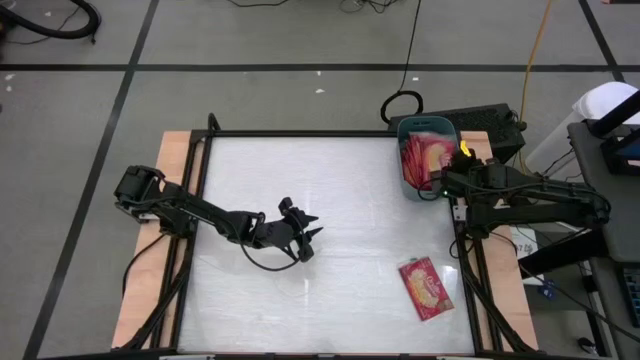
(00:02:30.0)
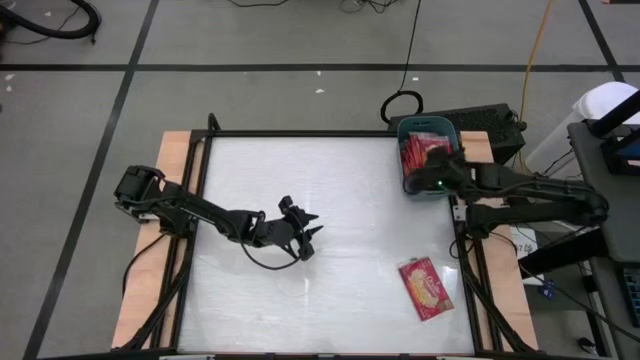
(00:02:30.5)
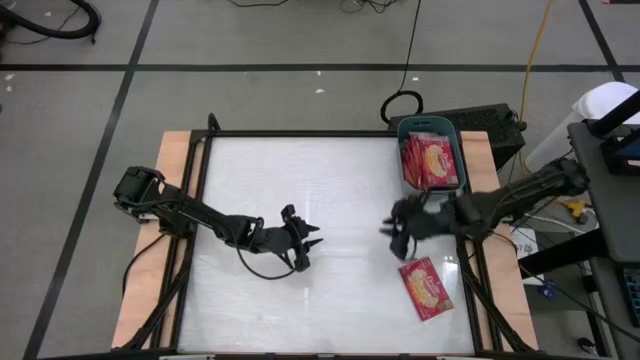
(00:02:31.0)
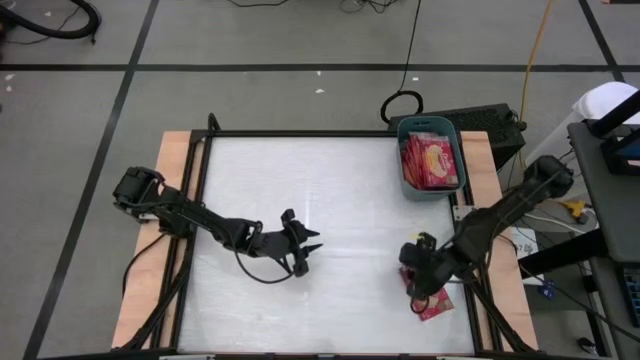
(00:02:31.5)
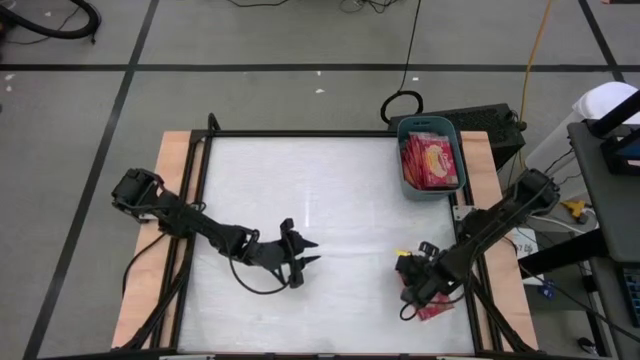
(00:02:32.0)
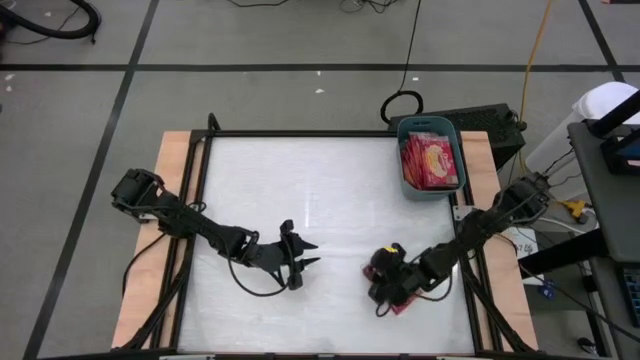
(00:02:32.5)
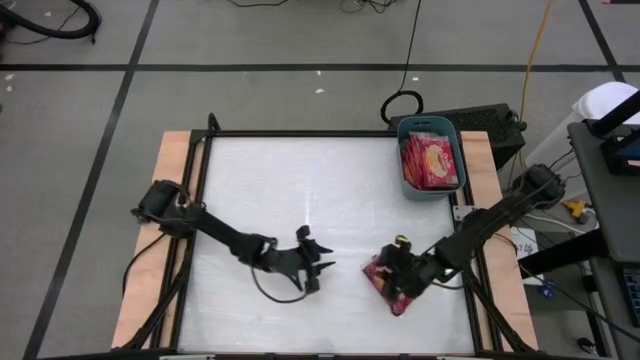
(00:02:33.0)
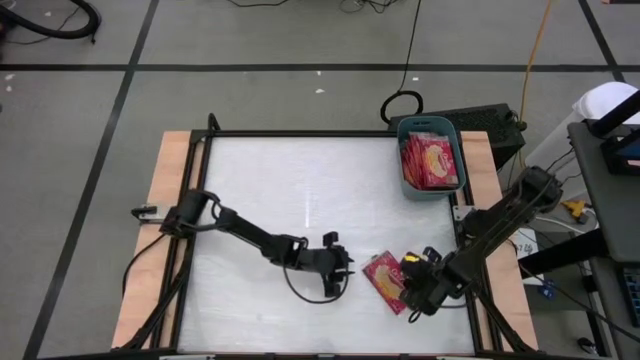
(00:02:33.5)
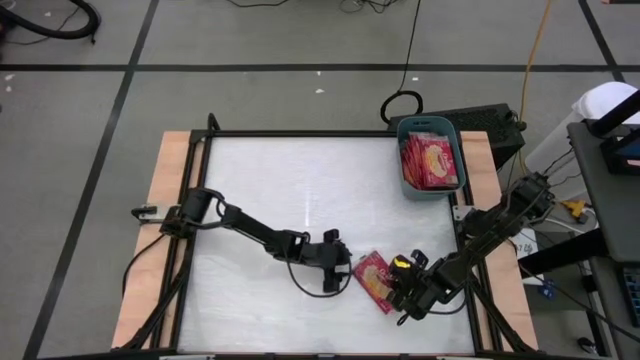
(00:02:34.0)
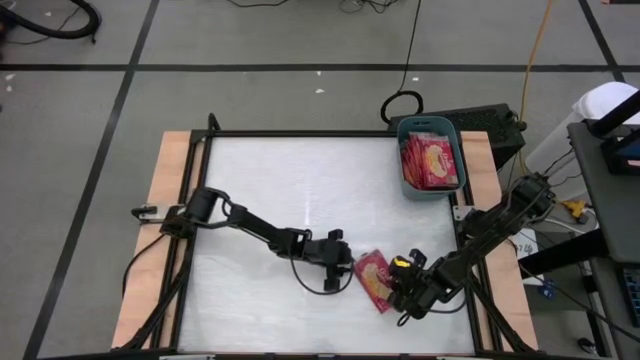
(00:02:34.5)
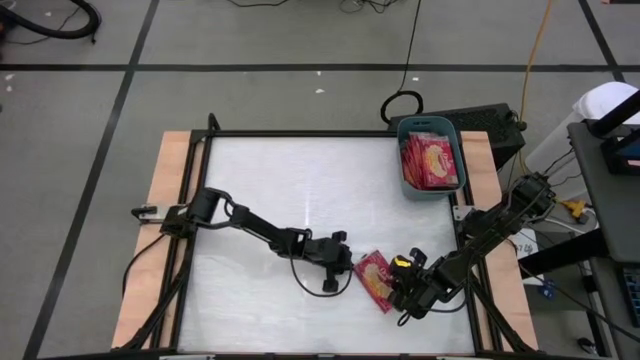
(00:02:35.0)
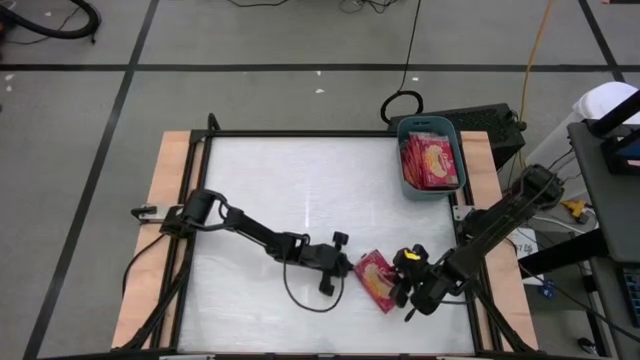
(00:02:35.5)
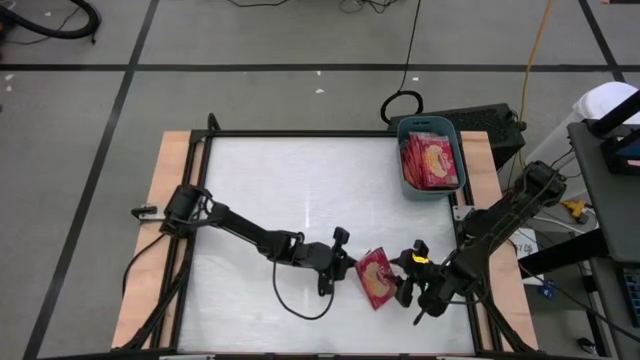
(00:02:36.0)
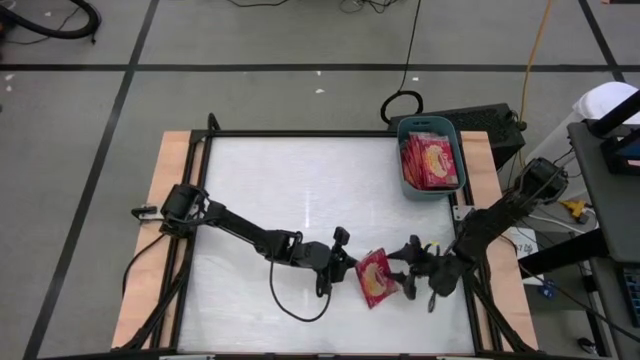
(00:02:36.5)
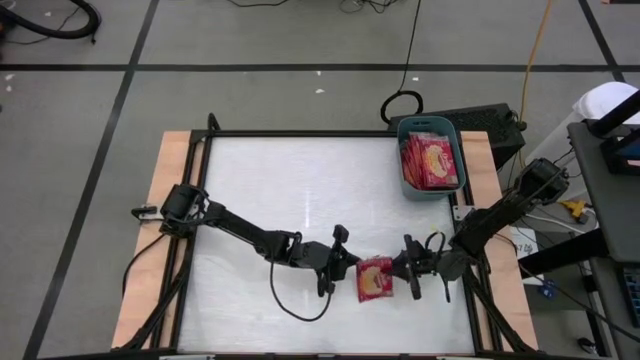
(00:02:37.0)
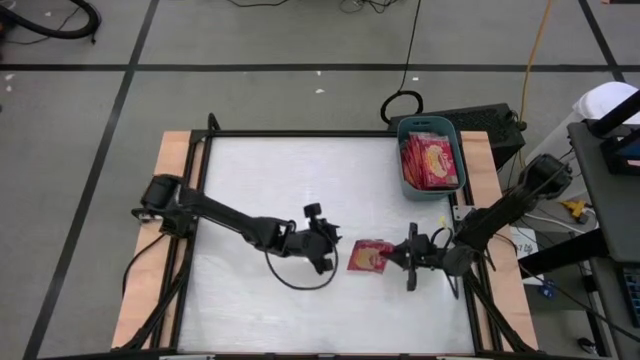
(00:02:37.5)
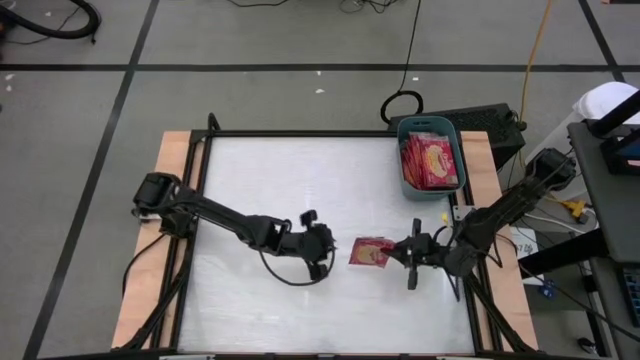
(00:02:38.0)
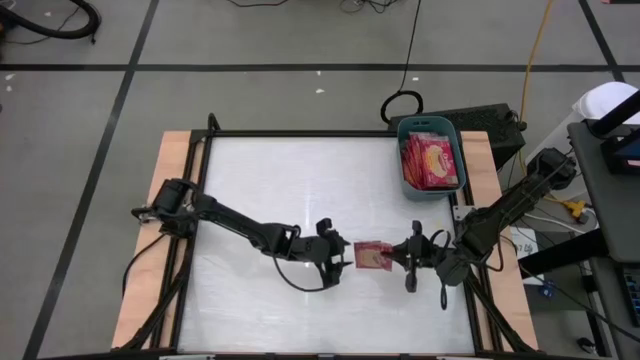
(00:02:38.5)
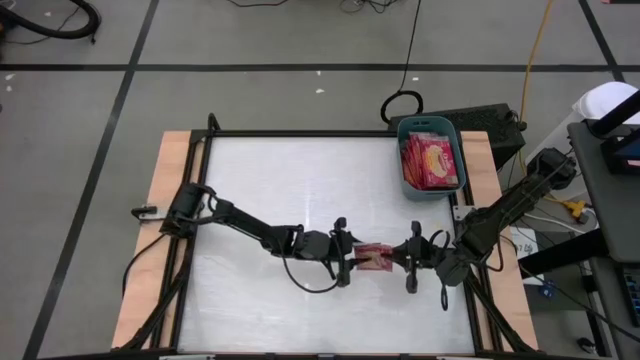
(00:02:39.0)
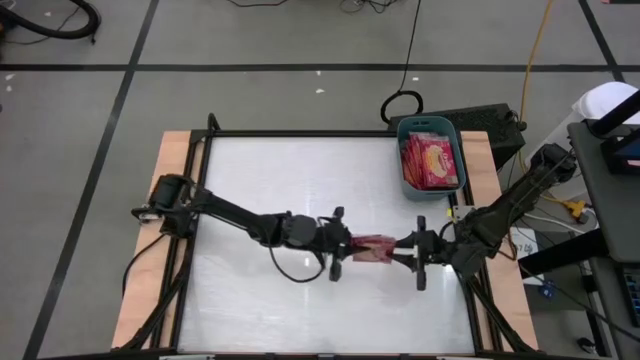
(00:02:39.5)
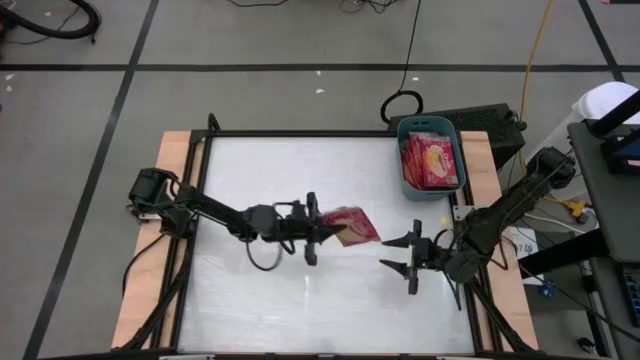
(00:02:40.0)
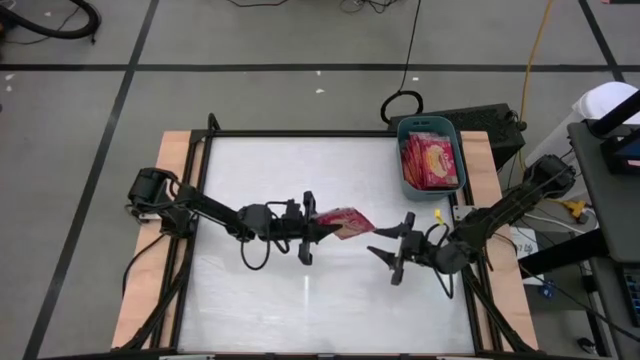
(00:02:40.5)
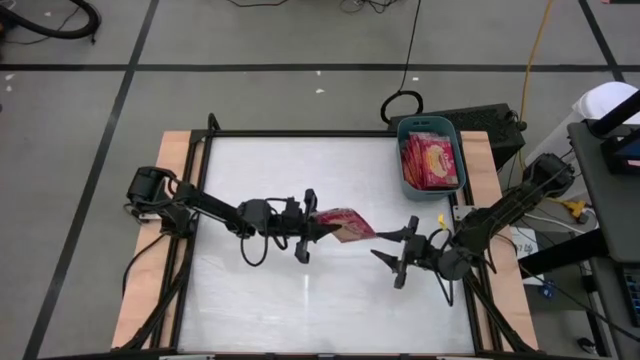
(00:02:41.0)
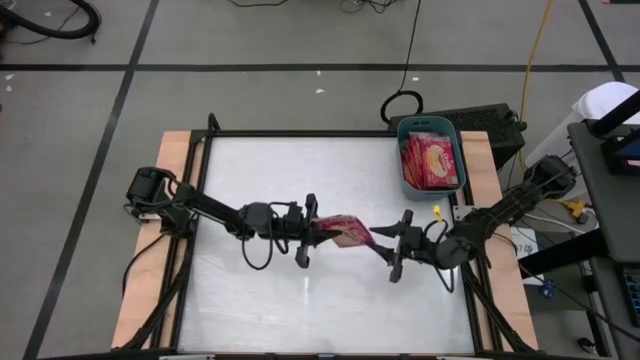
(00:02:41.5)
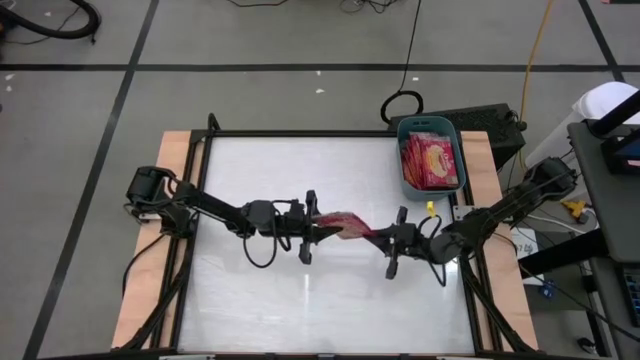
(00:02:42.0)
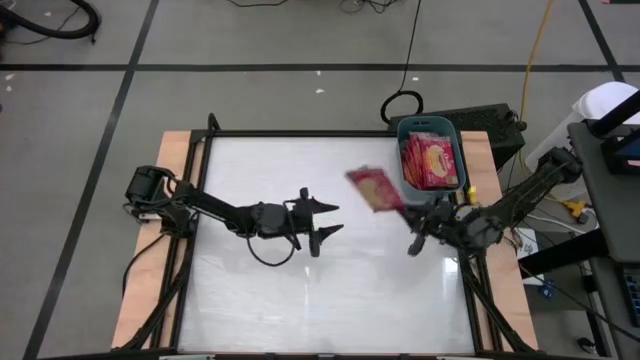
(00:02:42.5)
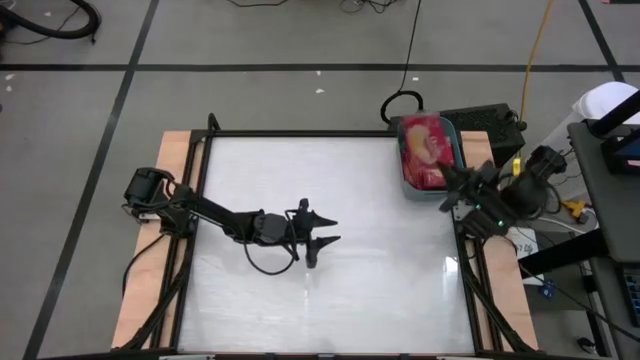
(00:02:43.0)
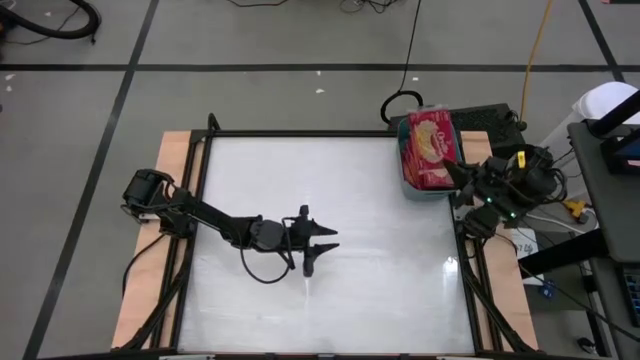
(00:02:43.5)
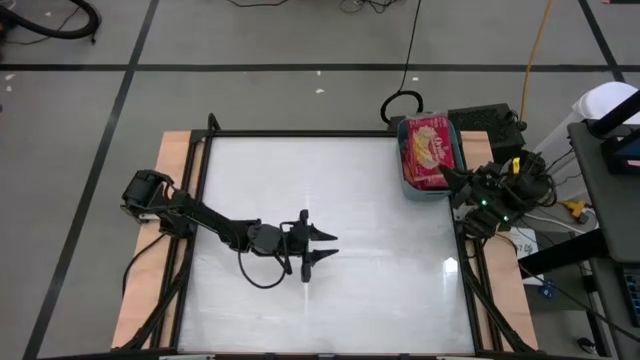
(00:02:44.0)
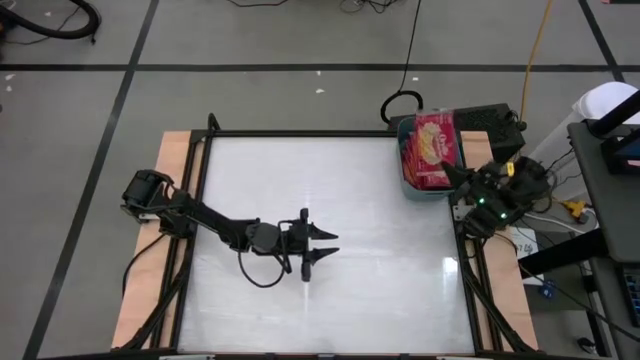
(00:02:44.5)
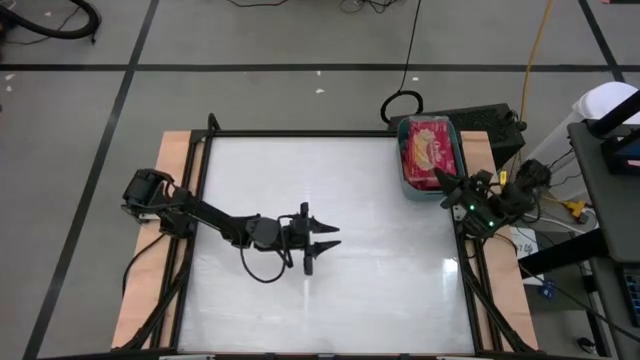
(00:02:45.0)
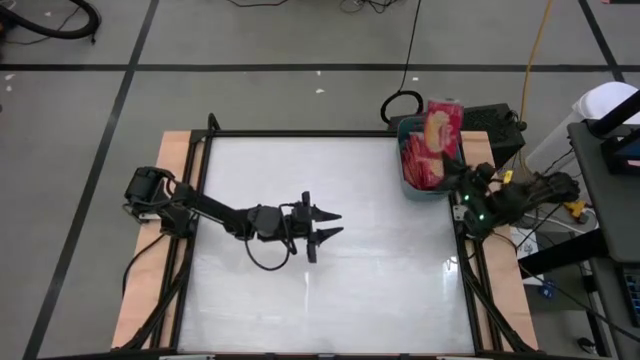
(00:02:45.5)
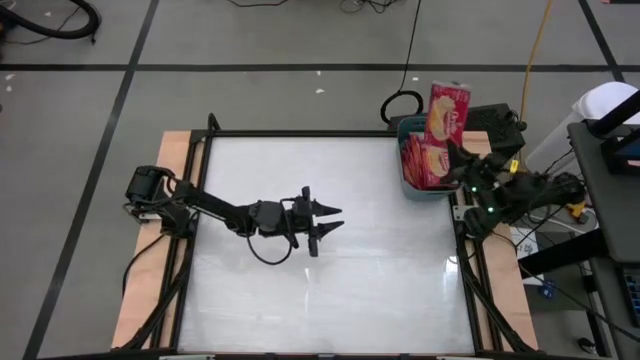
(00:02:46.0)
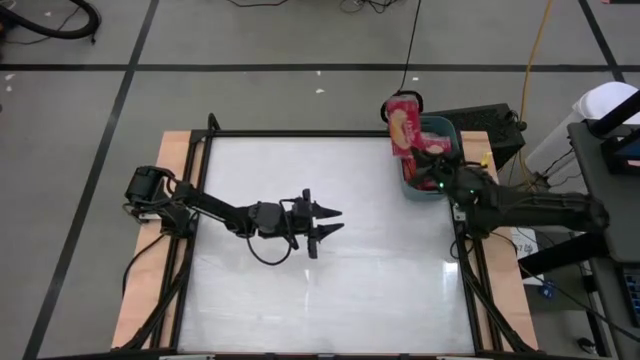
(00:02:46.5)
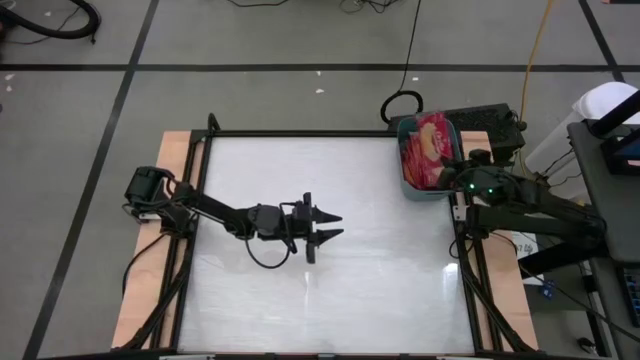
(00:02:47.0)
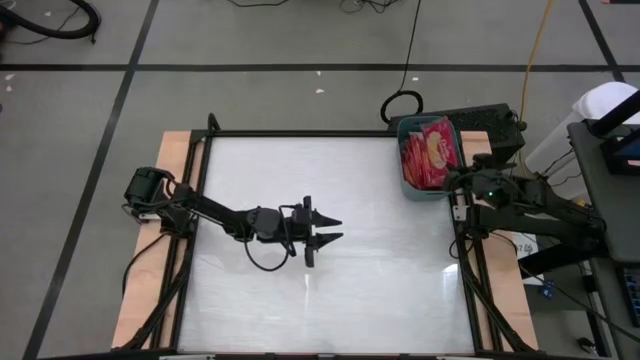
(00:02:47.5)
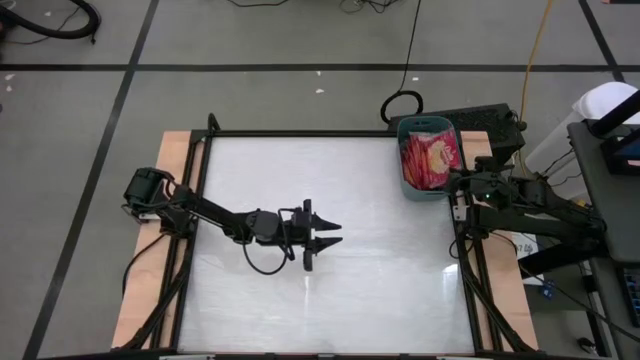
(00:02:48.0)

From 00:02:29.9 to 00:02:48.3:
Task: Sort popcorn bags into baskets
Put the red popcorn bag into the blue bin

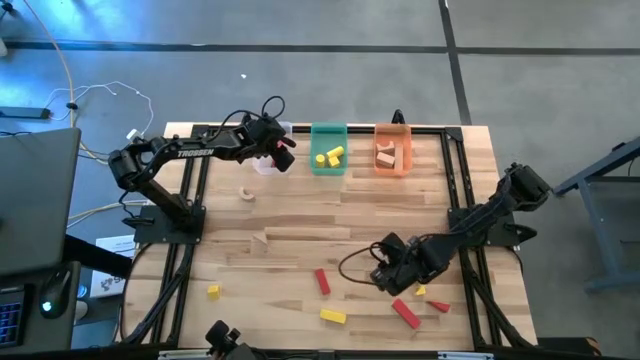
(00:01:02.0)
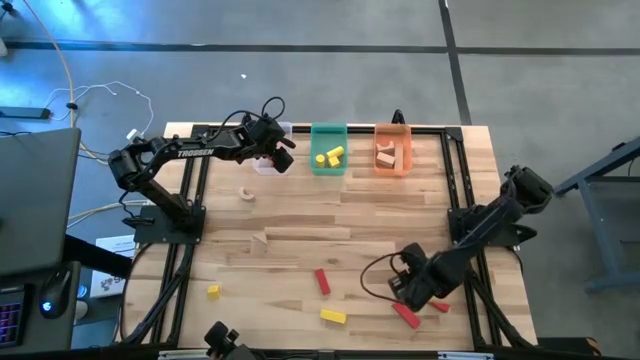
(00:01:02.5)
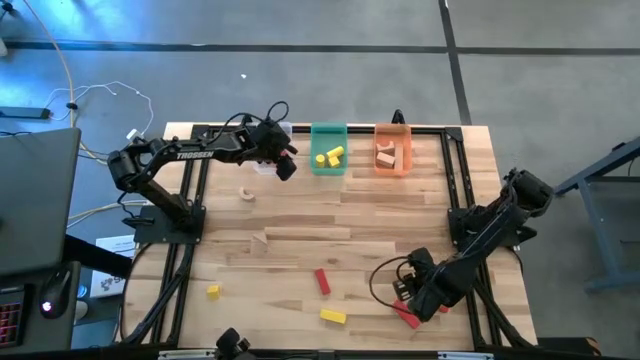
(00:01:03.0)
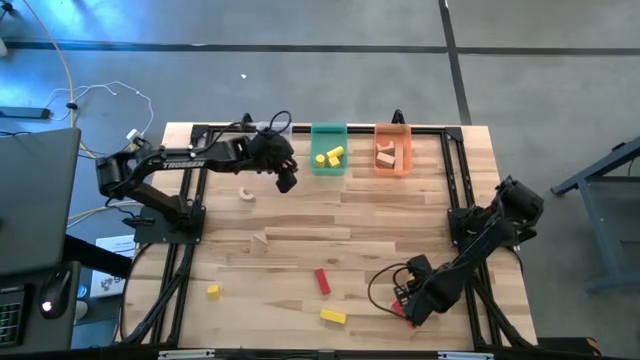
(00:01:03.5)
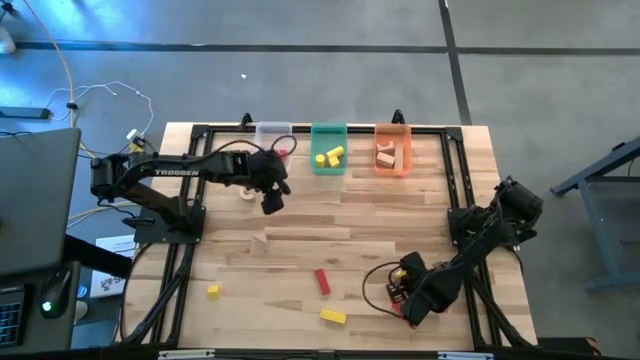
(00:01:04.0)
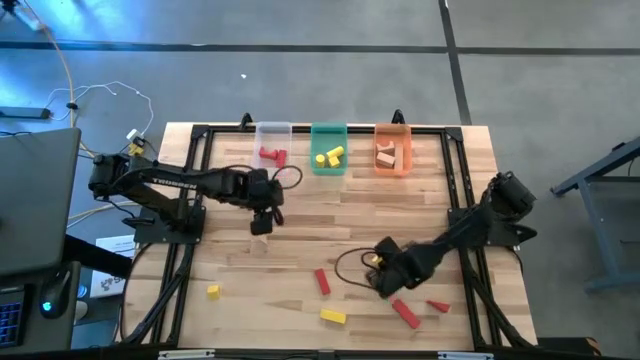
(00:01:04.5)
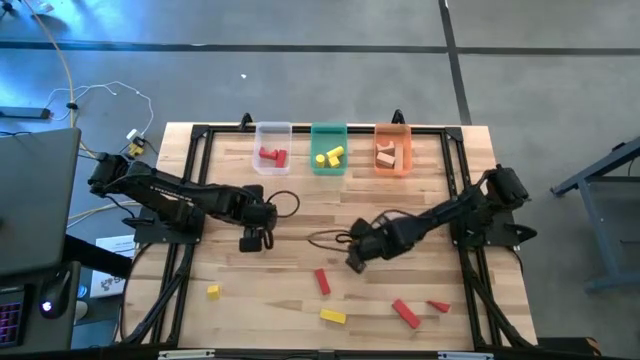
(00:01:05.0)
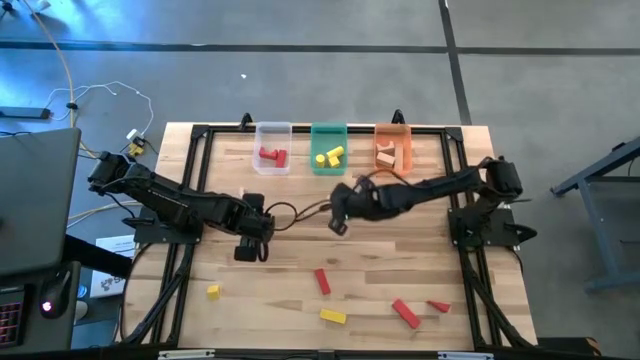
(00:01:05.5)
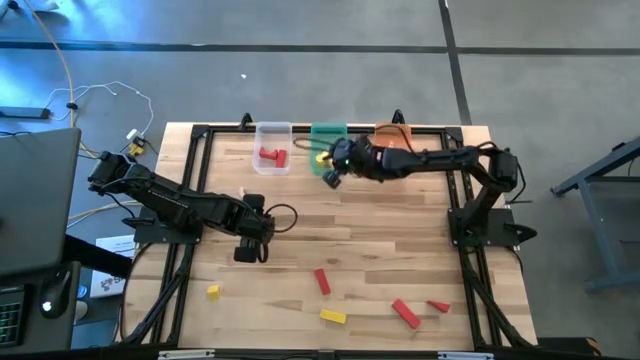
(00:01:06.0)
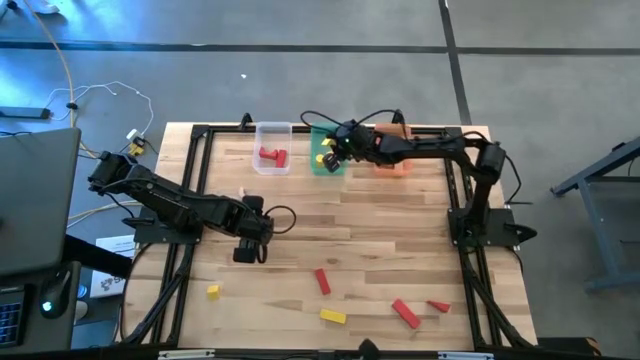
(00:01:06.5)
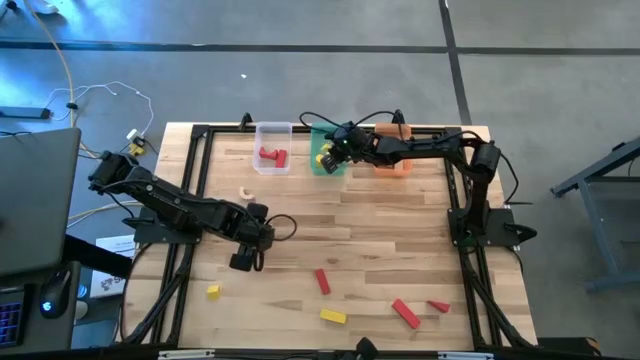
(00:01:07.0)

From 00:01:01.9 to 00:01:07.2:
Task: Sort & place blocks by color
Put the yellow block into the green bin
